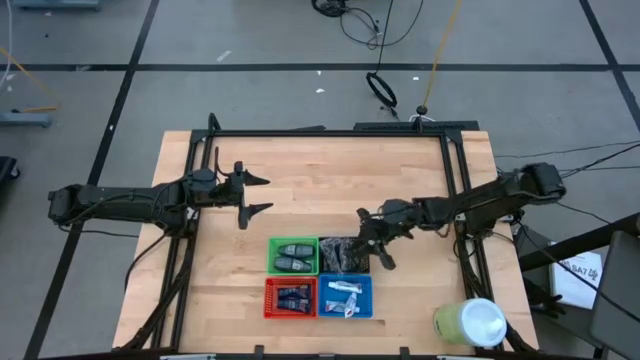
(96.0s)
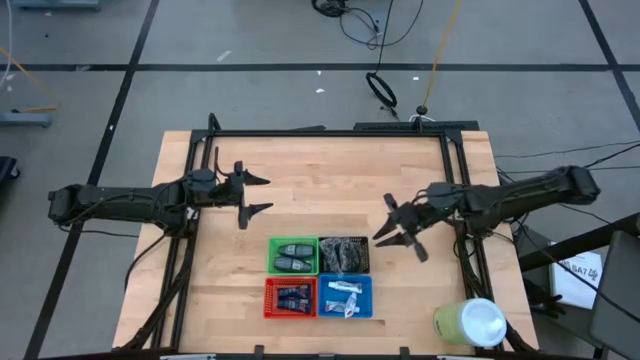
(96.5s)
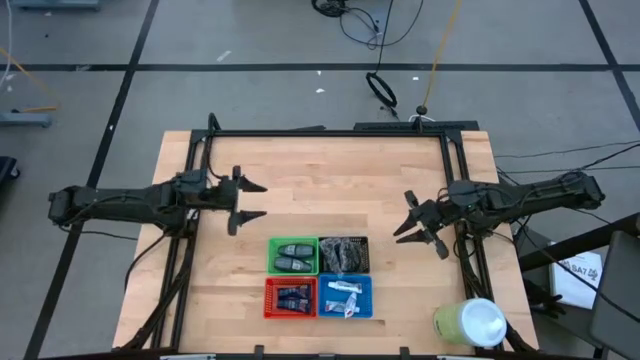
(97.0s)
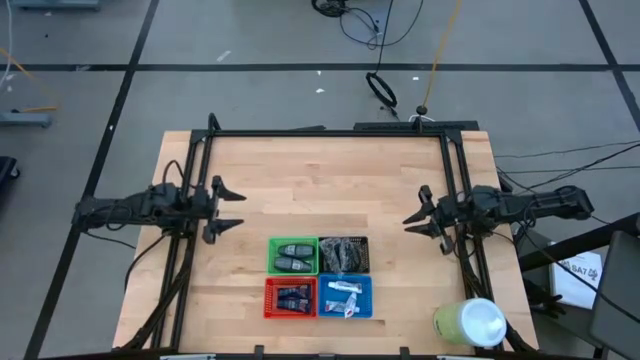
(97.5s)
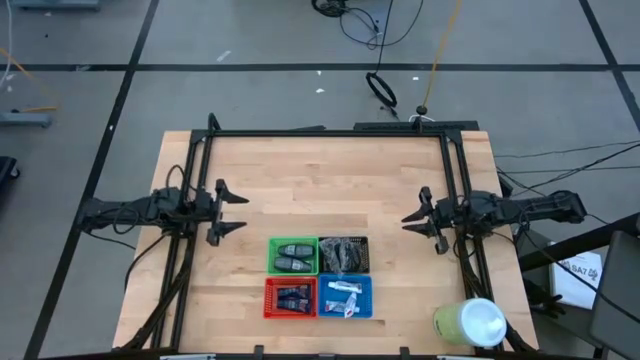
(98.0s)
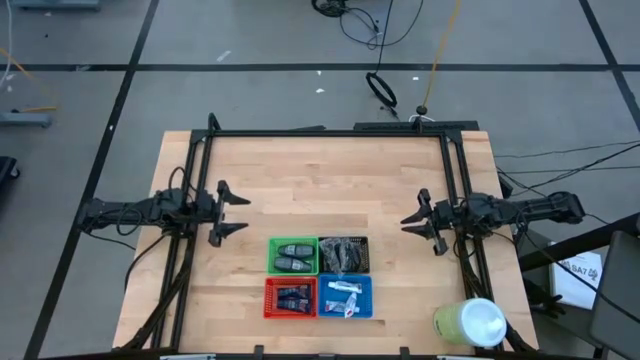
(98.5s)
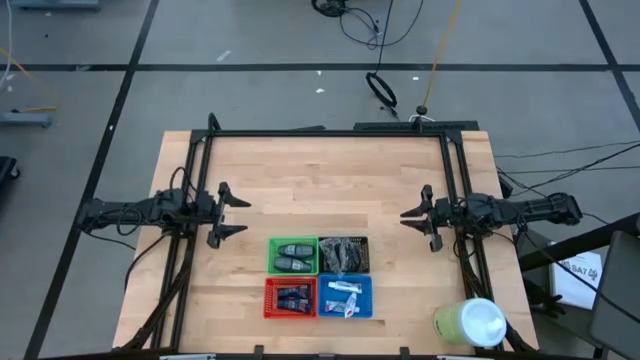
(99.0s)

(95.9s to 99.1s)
Task: Pick & Place Travel size toiletries
Return to Home Position

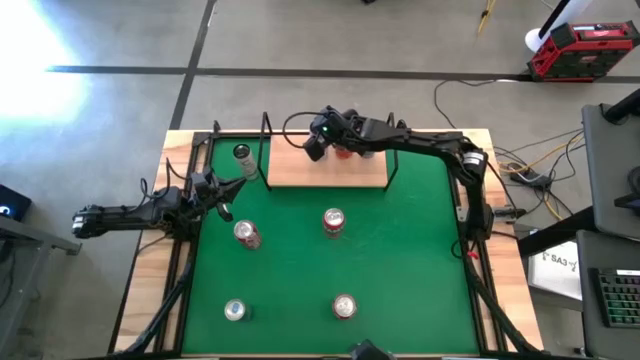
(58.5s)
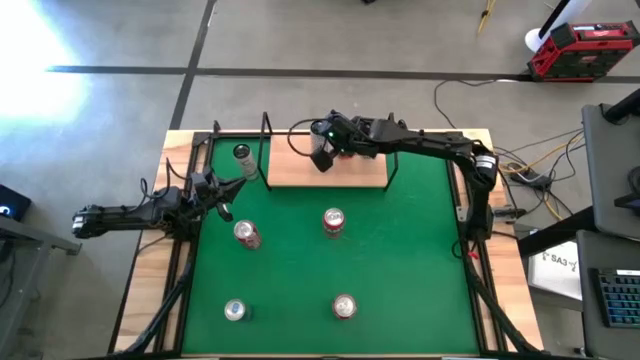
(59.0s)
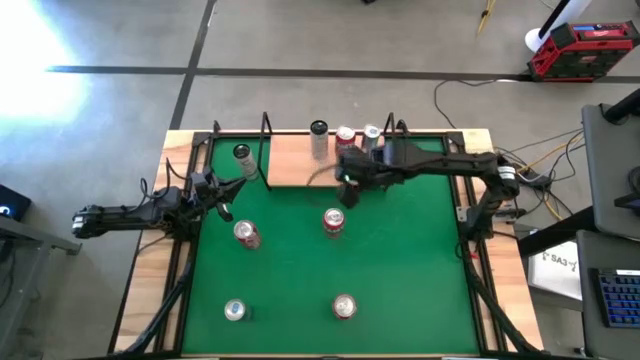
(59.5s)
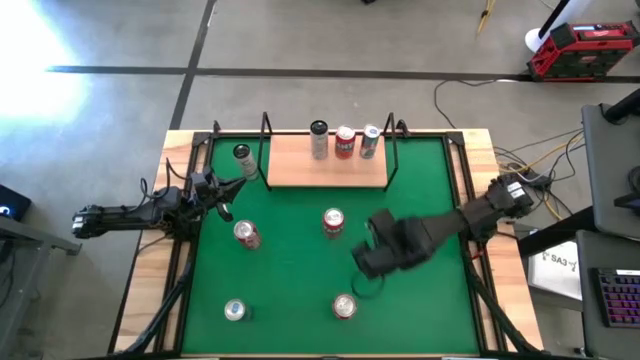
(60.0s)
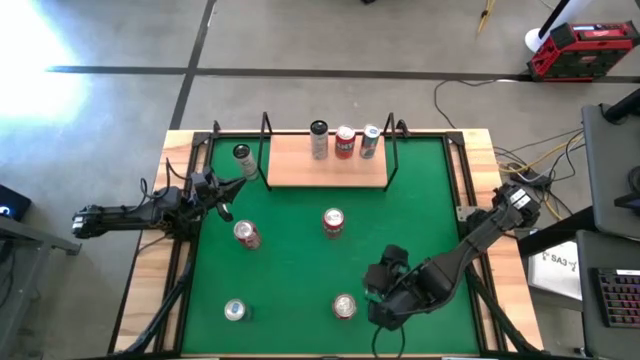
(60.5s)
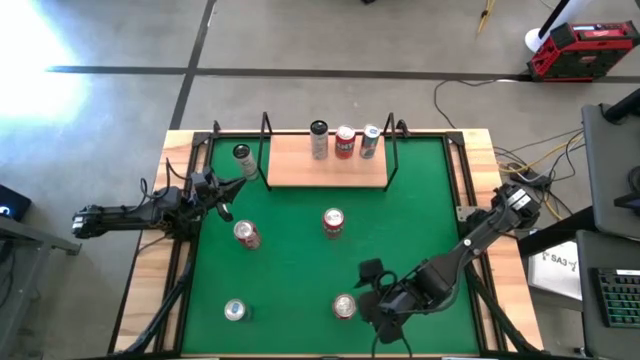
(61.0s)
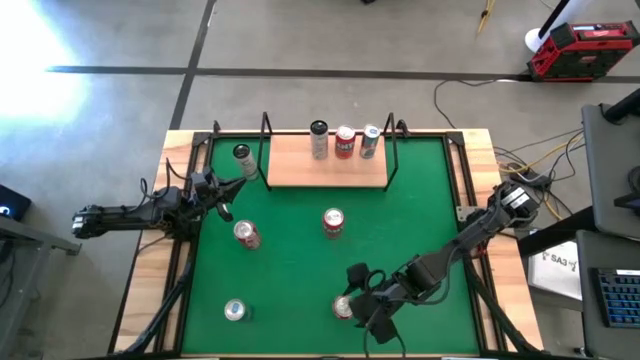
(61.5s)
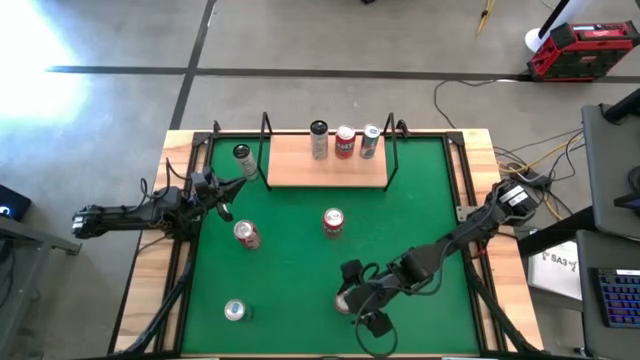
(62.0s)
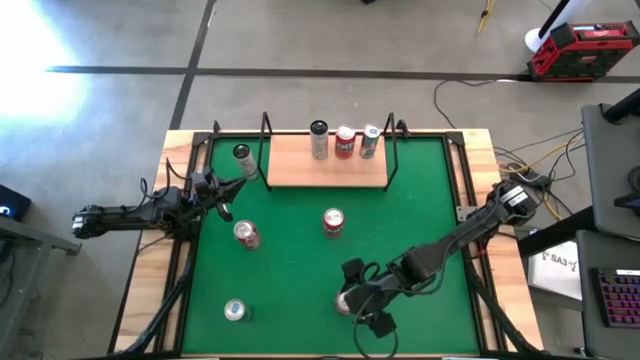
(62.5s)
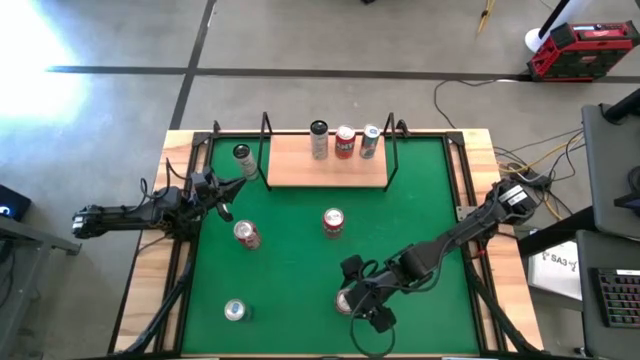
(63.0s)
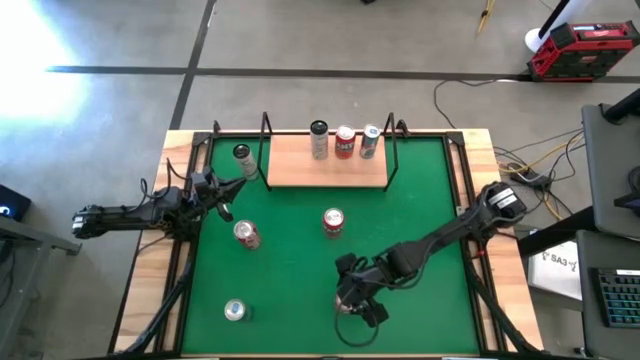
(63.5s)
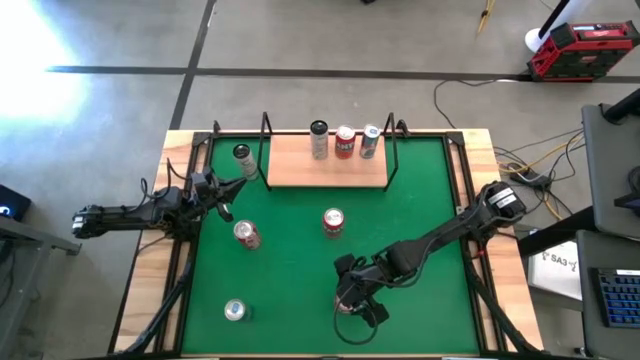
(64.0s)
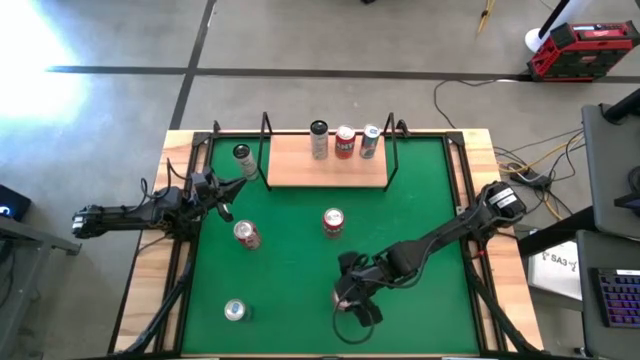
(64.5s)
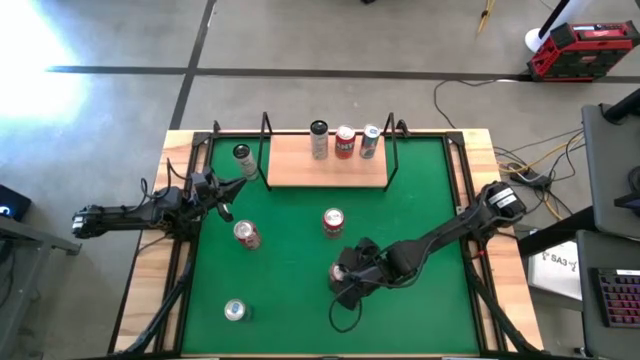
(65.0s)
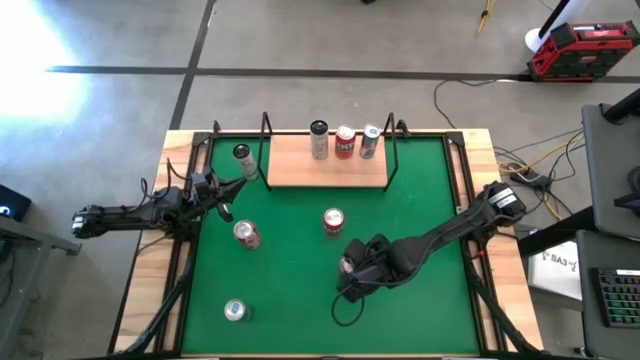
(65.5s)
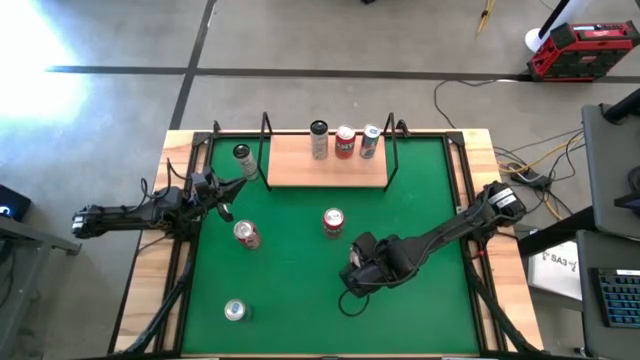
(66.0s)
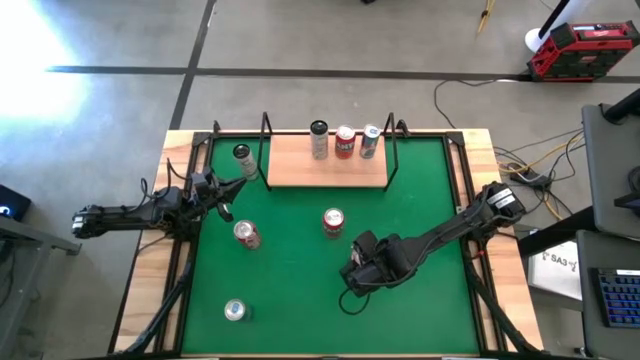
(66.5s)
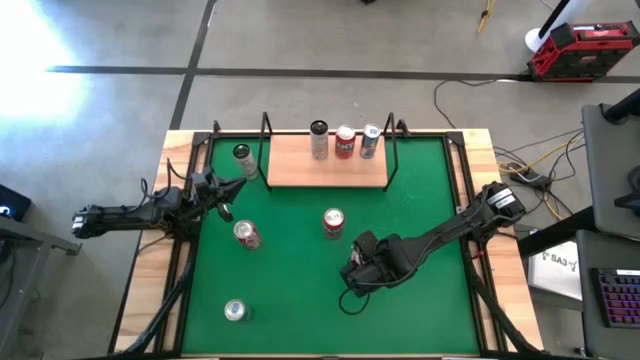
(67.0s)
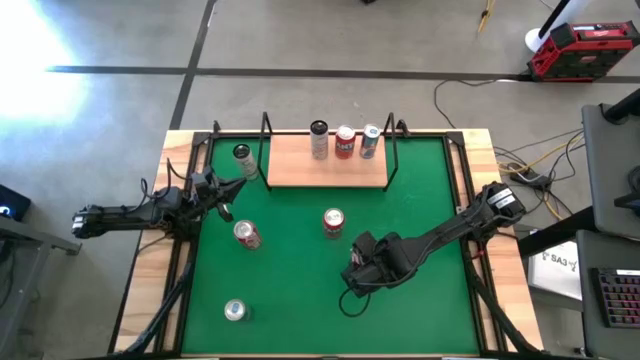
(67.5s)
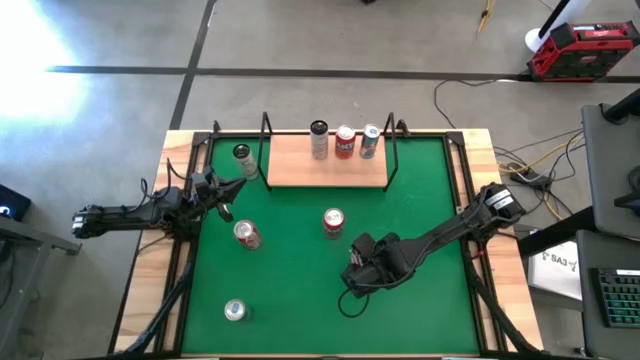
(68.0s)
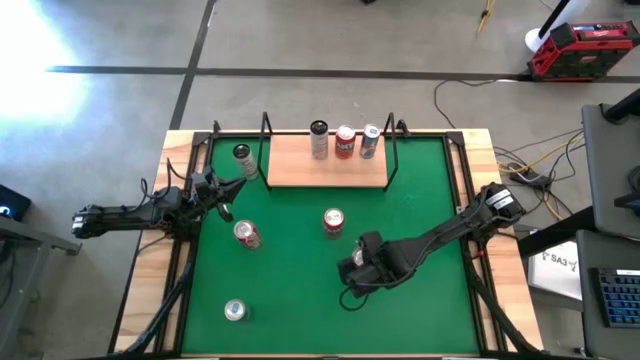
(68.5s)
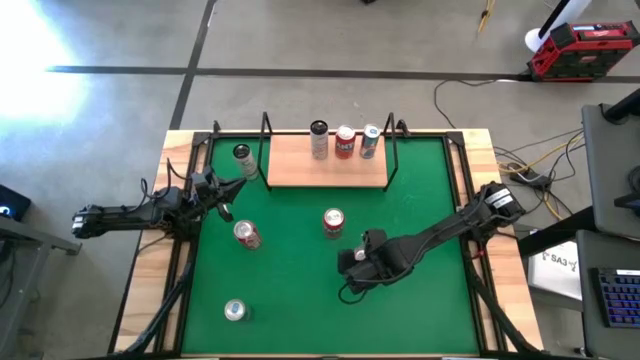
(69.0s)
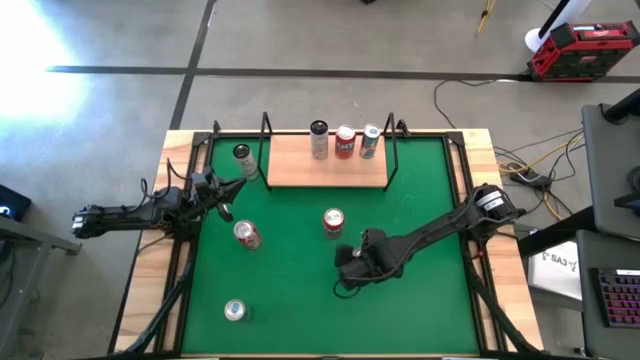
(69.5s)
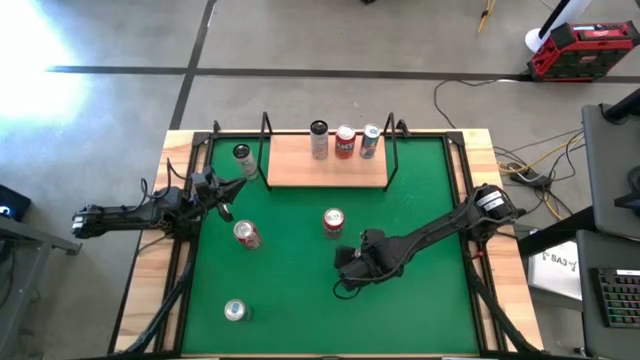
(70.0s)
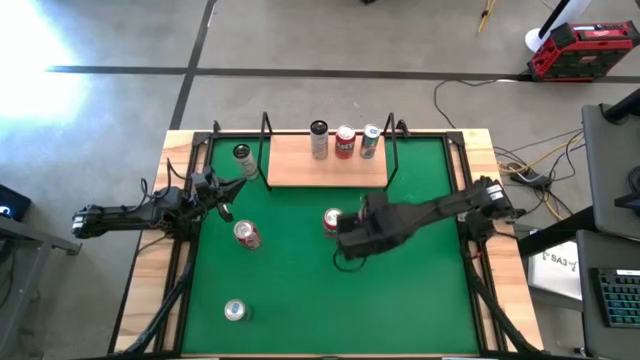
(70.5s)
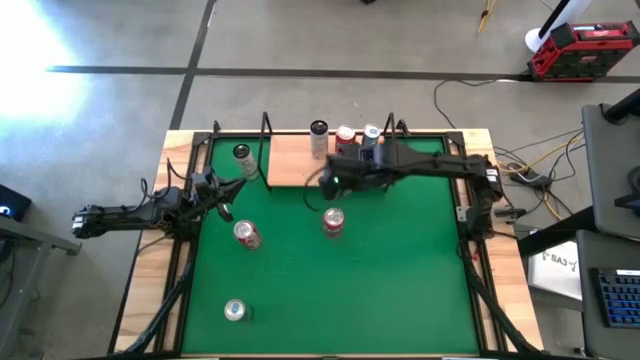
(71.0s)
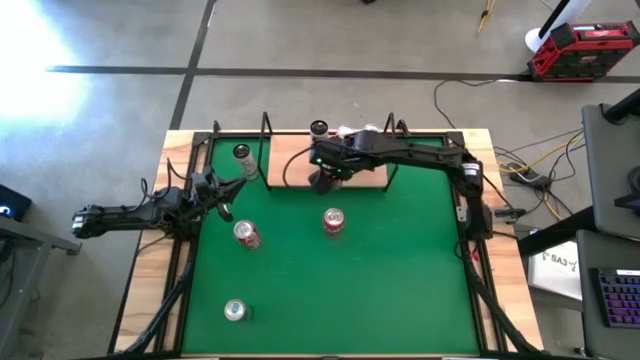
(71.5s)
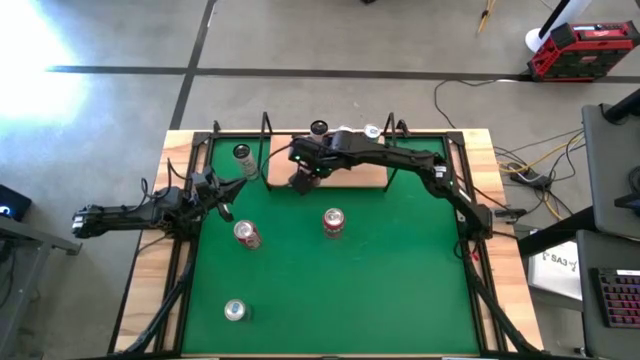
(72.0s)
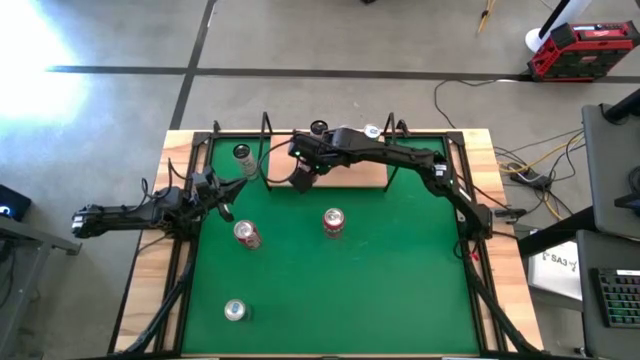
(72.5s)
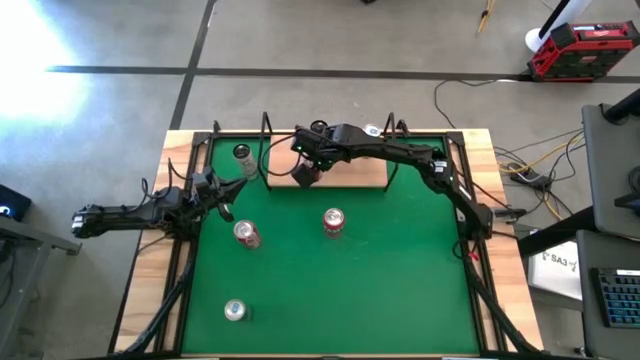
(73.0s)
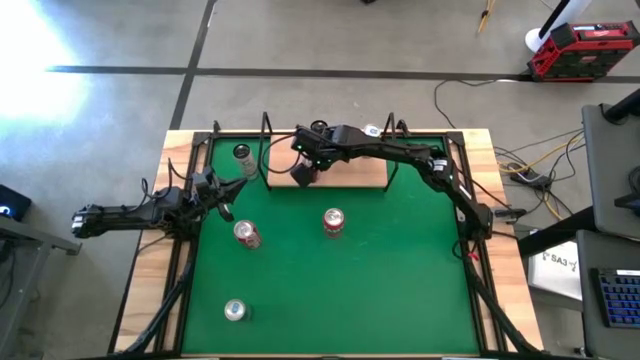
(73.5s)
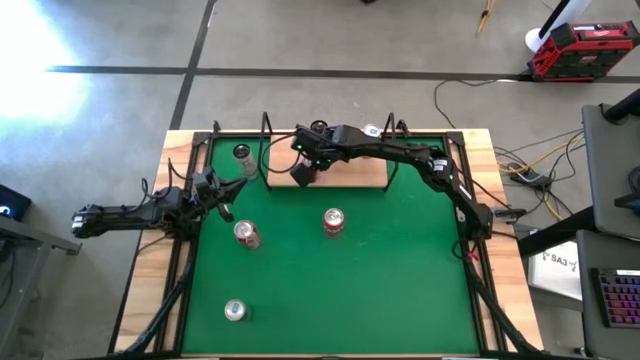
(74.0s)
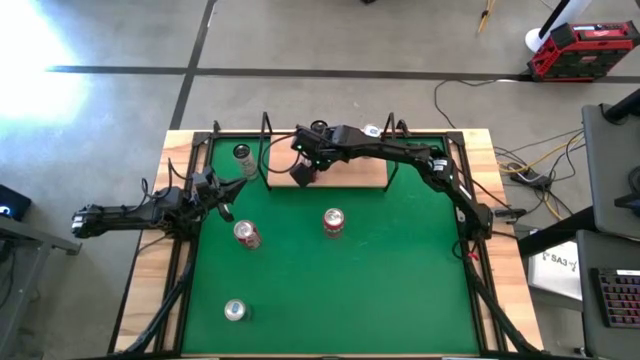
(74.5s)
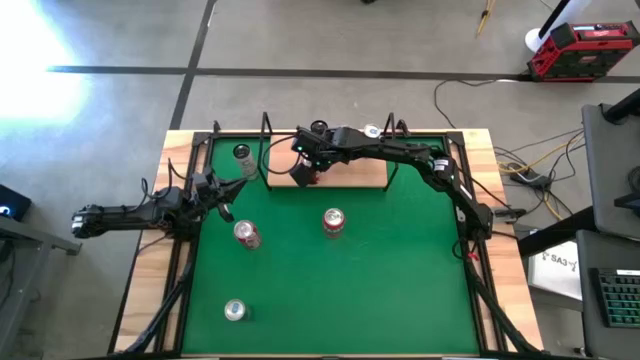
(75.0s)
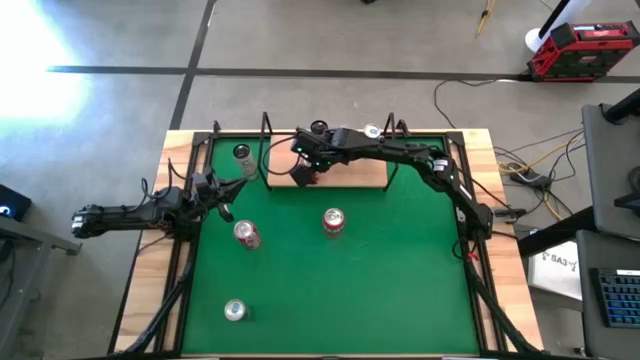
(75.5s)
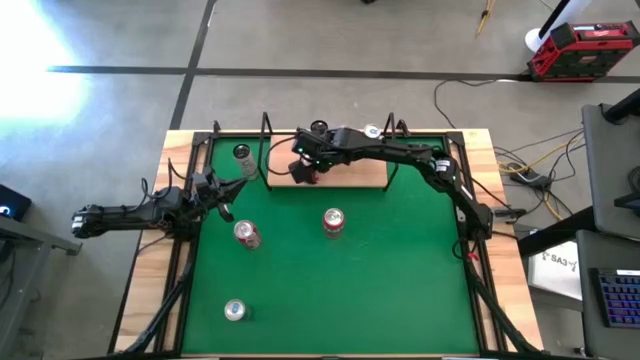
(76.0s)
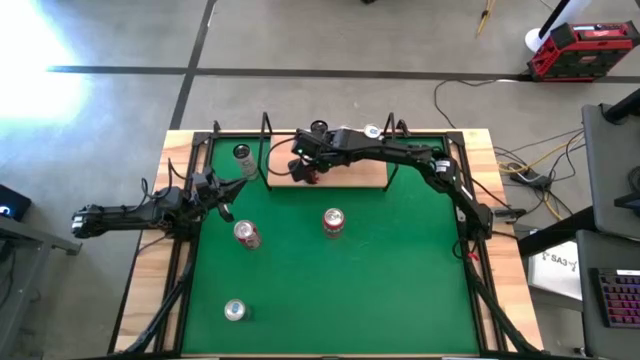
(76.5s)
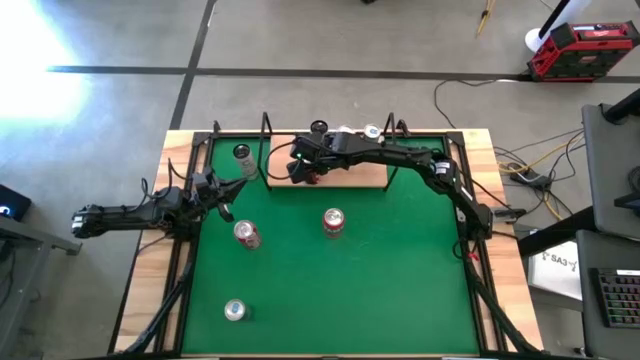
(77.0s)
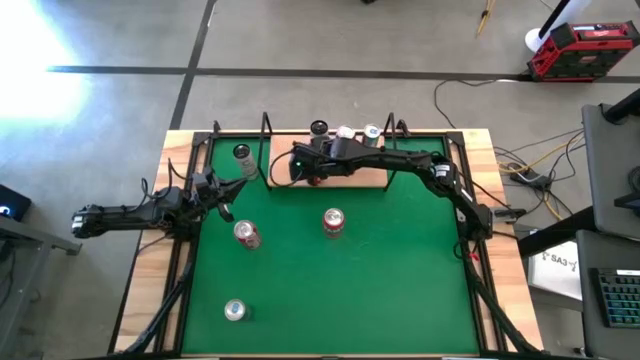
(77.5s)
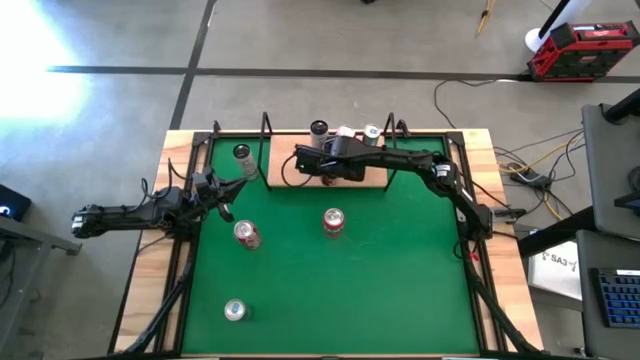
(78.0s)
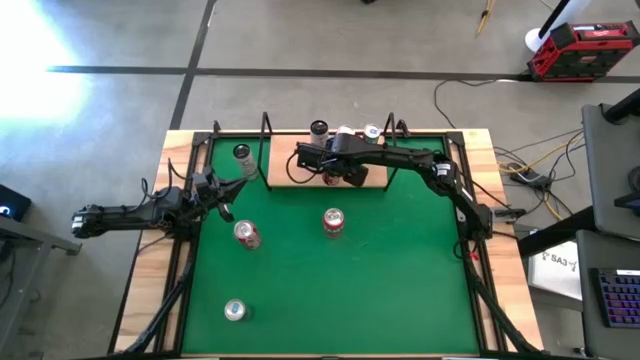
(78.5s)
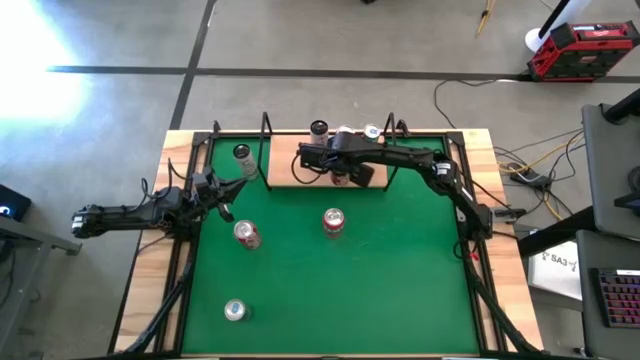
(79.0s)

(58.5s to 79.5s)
Task: Place canned beverage on shelf
Put the bottom red-white soda can on the shelf
